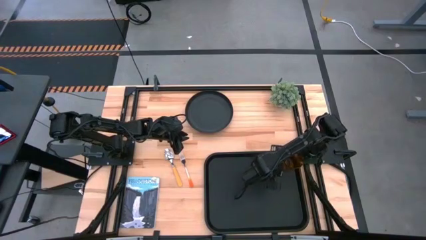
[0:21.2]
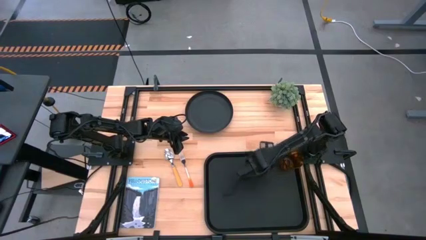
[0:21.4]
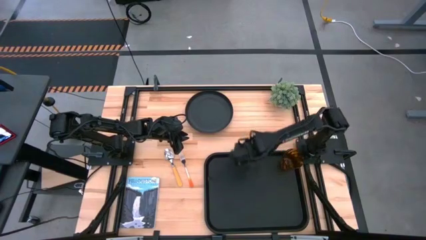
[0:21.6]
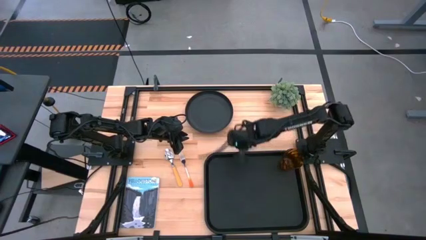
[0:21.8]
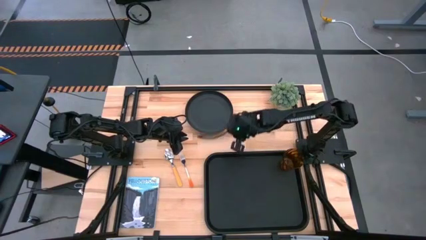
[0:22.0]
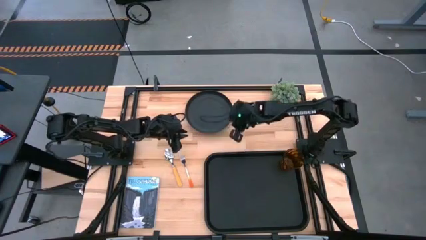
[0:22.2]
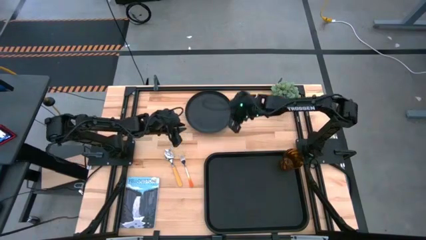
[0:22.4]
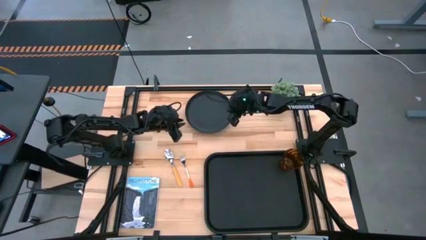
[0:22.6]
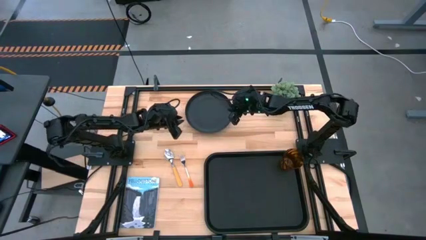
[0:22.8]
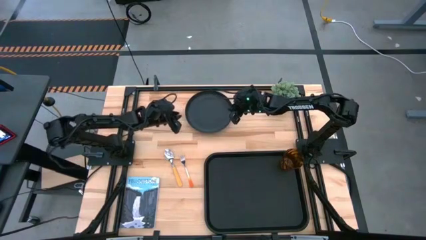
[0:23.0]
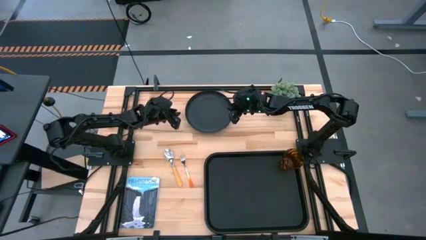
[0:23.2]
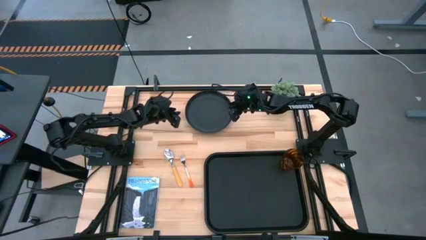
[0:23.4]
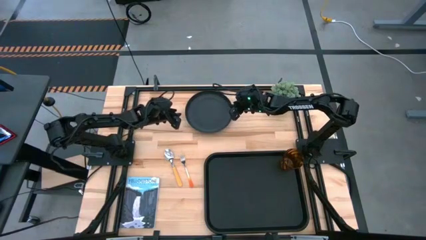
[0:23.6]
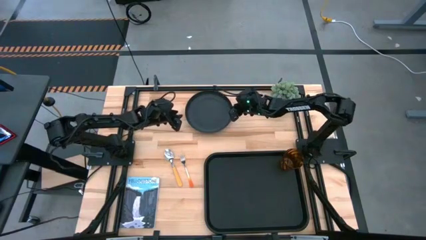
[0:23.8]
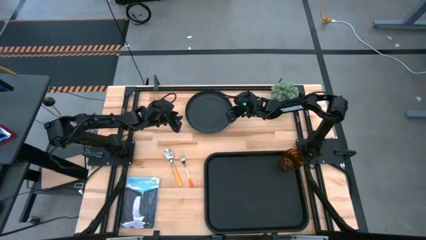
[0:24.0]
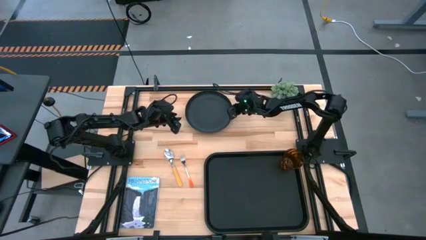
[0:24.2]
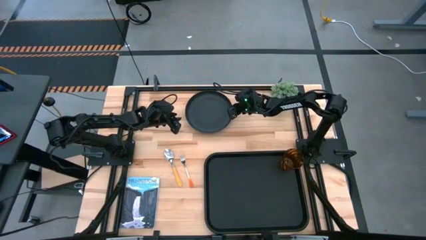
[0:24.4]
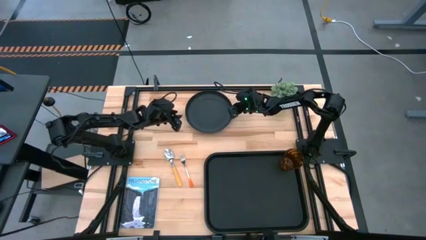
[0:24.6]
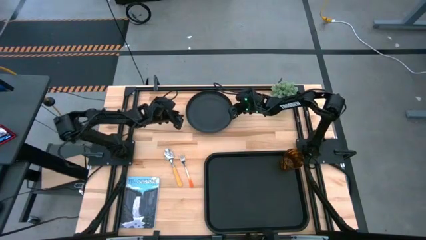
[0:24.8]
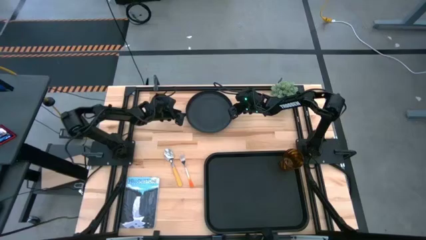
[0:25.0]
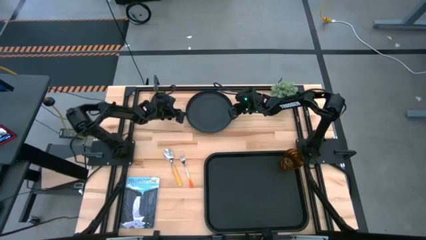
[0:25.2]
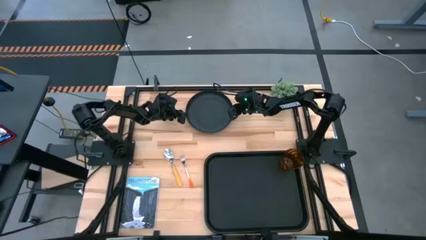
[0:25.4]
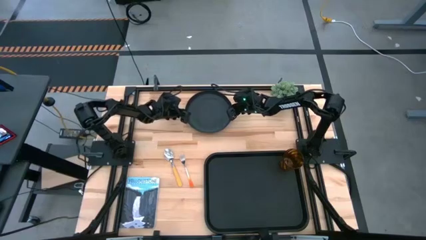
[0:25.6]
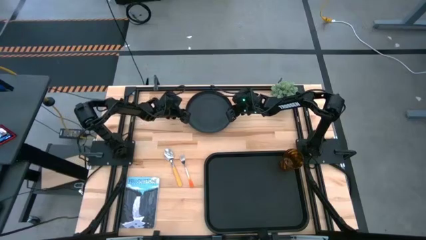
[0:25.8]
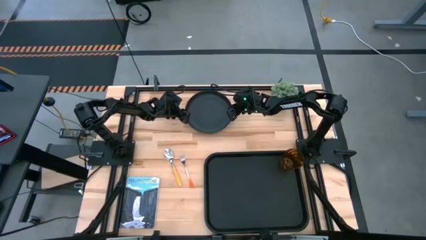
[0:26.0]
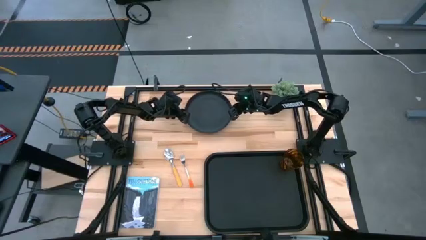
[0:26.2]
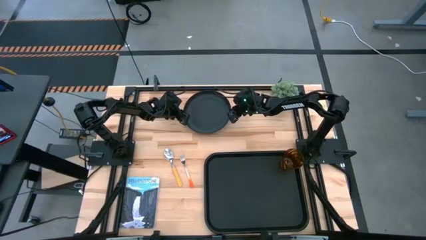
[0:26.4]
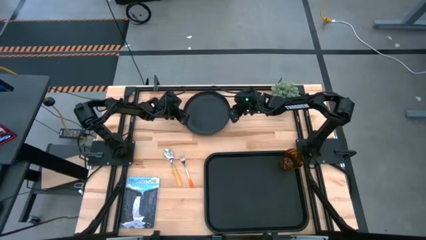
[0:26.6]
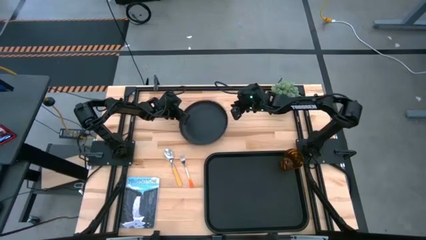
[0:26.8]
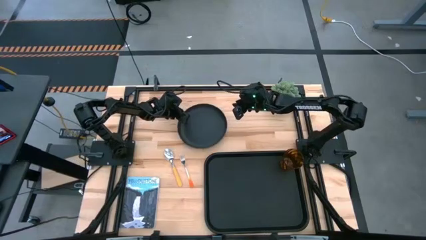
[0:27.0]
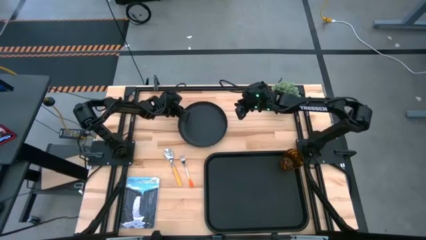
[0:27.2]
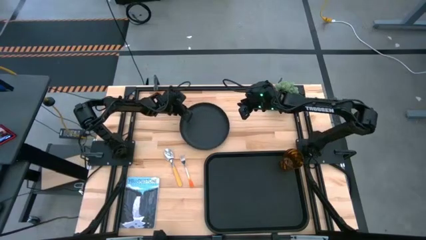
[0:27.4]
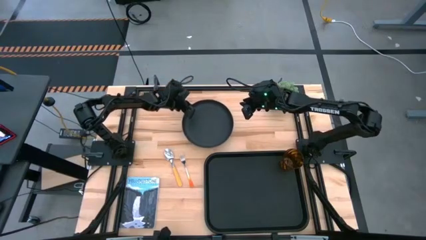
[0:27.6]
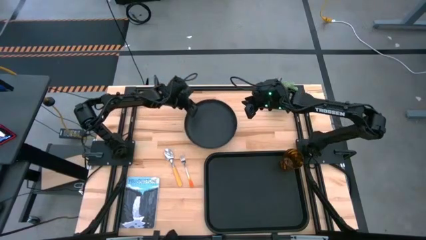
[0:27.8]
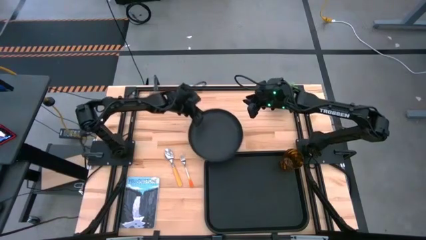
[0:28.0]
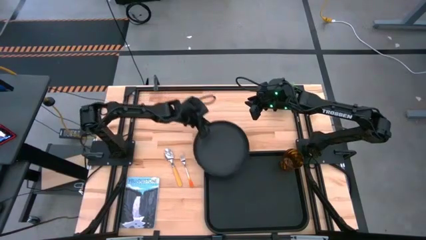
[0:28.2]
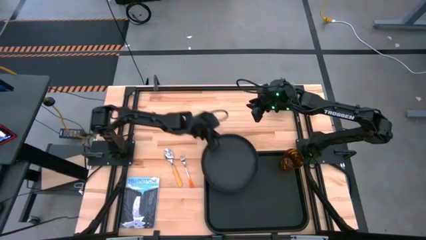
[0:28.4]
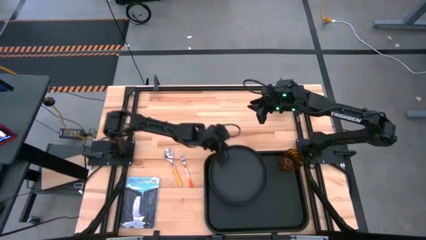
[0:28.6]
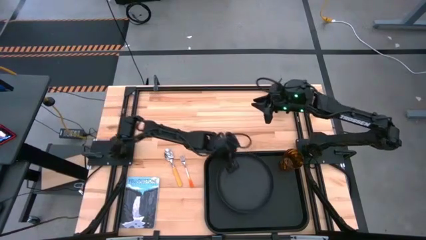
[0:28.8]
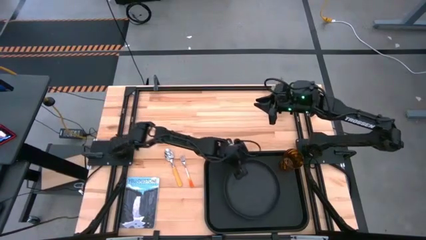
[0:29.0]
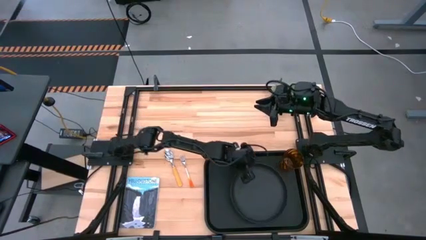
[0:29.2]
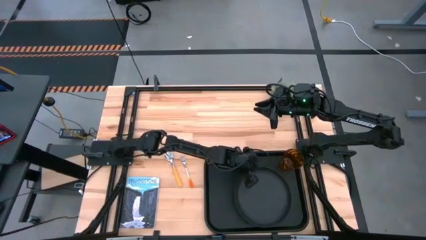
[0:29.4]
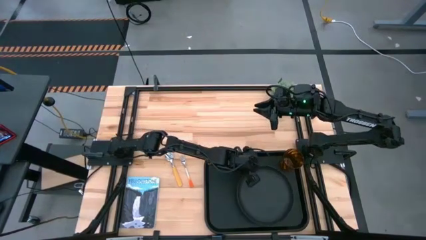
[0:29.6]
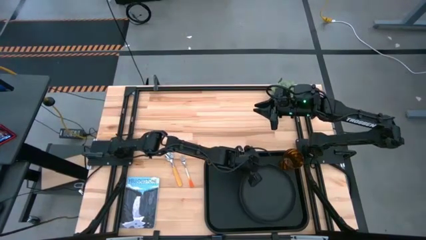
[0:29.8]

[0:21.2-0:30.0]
Task: Pick and place plate/cup/fork/spoon on tray
Put the black plate on the black tray

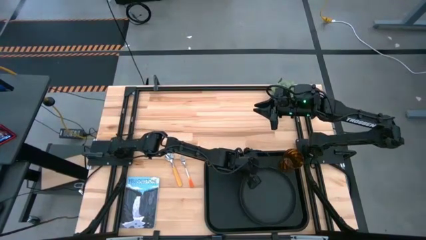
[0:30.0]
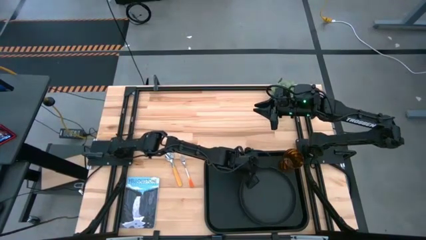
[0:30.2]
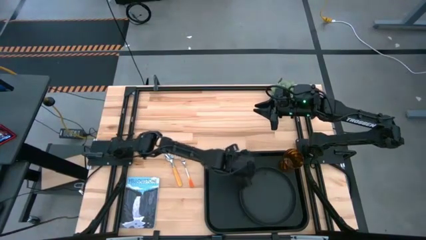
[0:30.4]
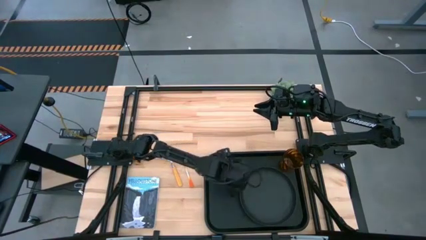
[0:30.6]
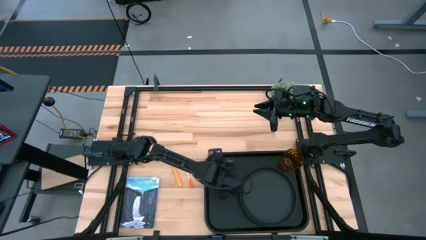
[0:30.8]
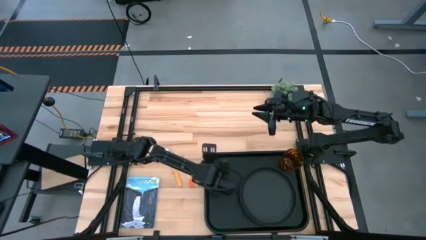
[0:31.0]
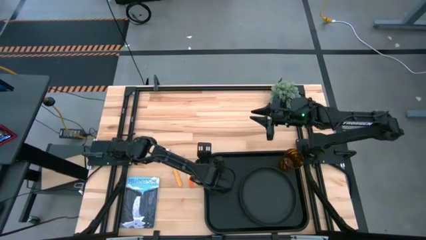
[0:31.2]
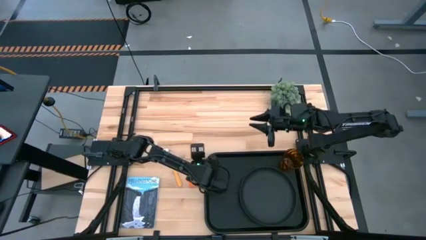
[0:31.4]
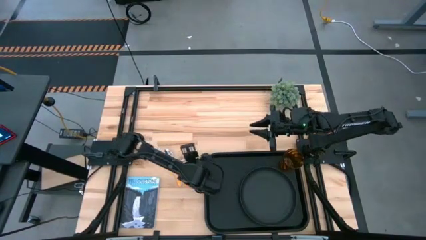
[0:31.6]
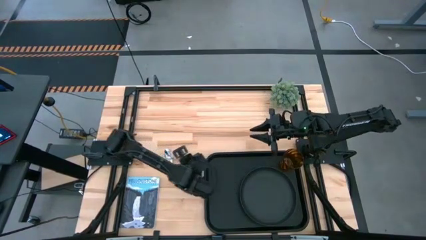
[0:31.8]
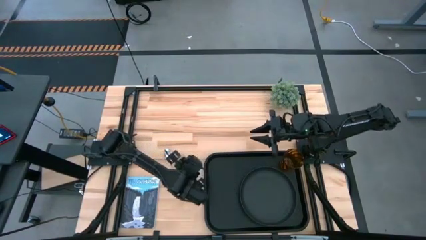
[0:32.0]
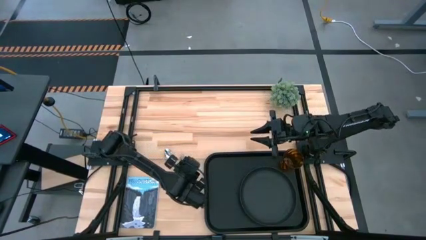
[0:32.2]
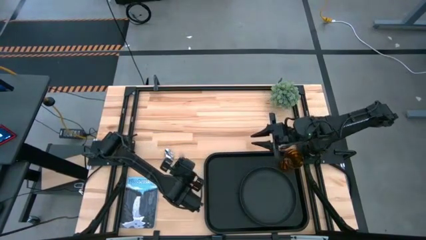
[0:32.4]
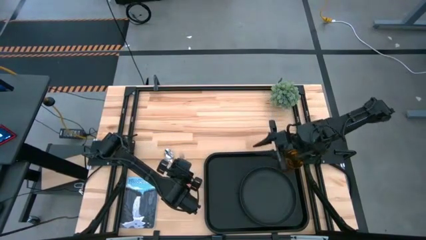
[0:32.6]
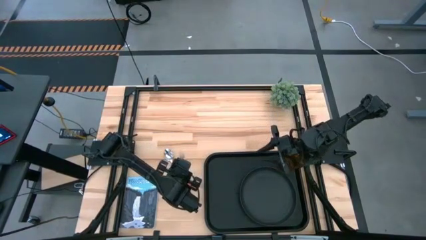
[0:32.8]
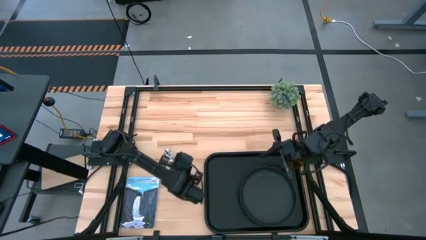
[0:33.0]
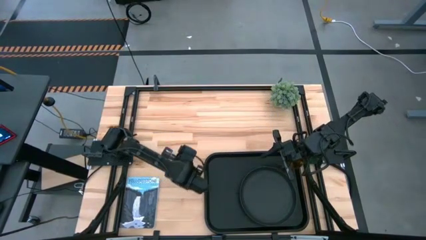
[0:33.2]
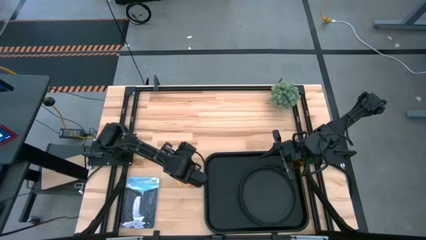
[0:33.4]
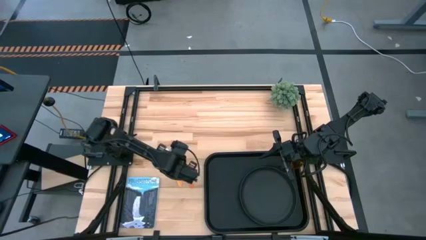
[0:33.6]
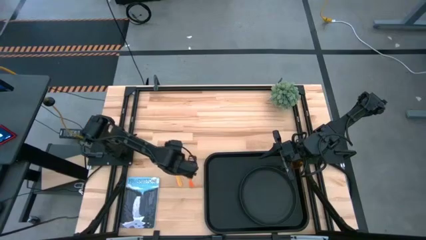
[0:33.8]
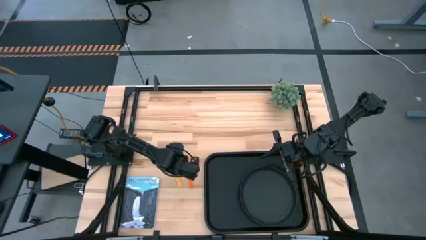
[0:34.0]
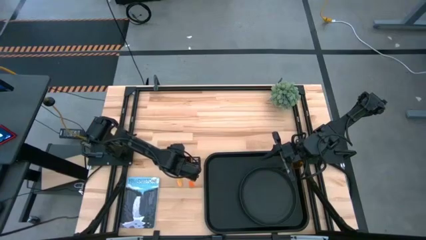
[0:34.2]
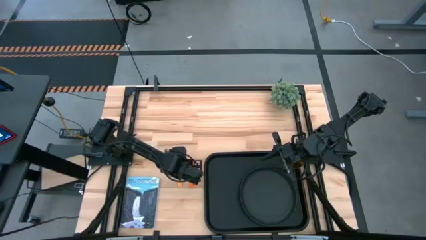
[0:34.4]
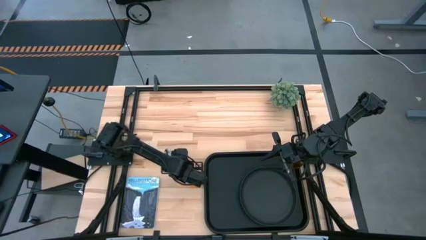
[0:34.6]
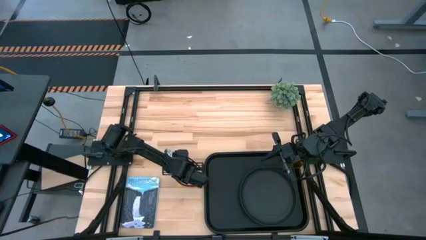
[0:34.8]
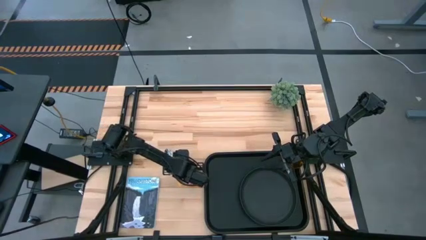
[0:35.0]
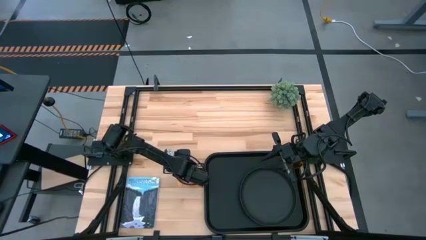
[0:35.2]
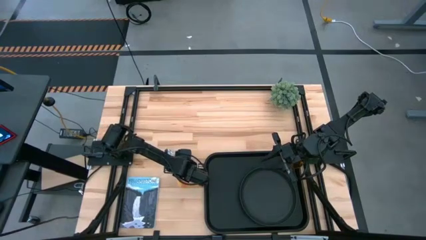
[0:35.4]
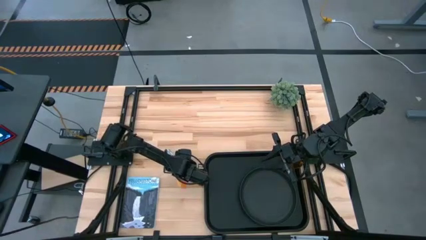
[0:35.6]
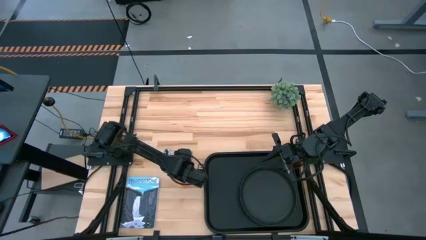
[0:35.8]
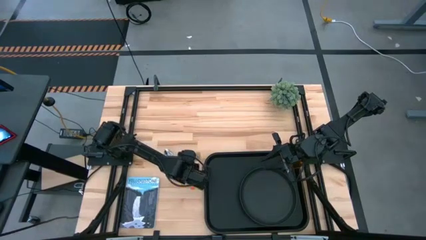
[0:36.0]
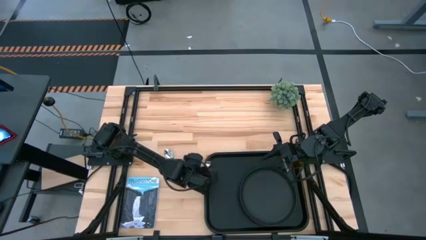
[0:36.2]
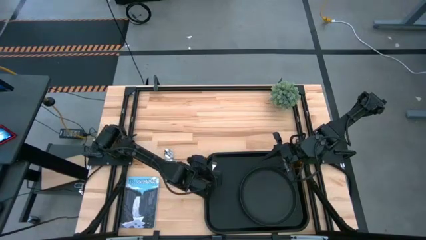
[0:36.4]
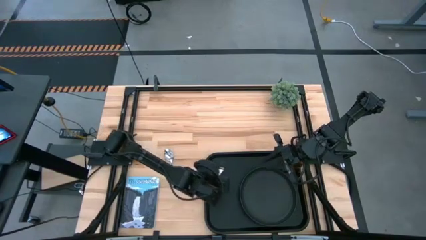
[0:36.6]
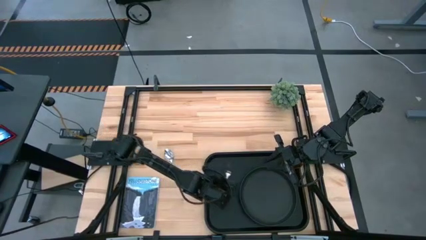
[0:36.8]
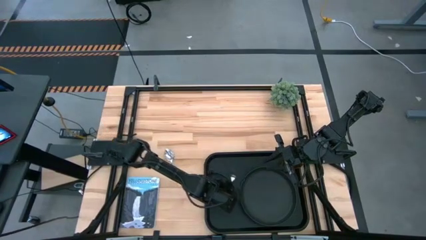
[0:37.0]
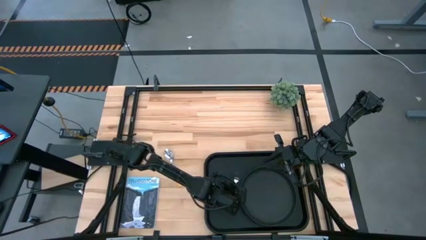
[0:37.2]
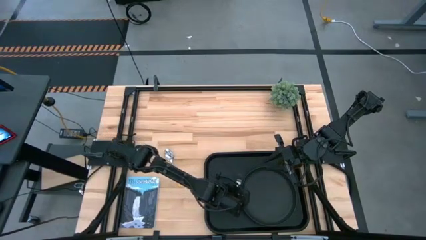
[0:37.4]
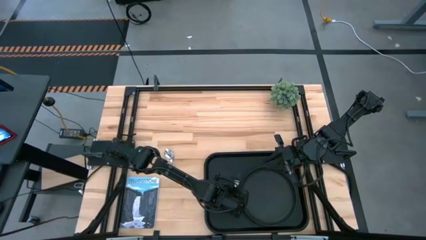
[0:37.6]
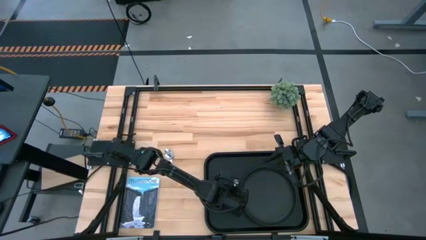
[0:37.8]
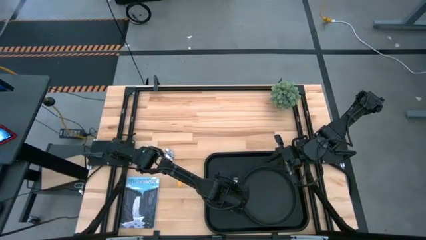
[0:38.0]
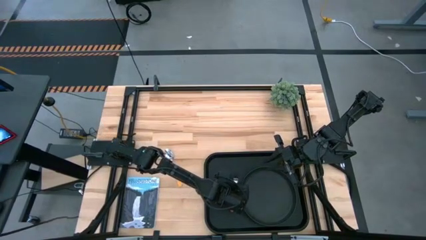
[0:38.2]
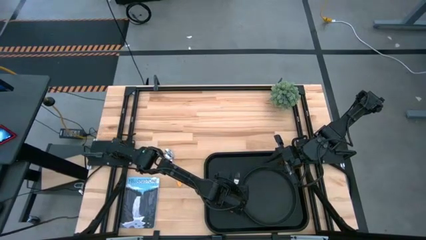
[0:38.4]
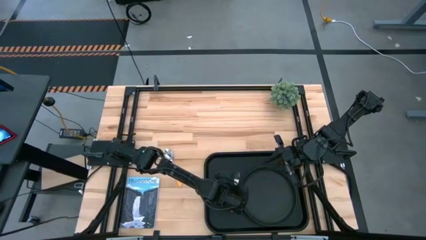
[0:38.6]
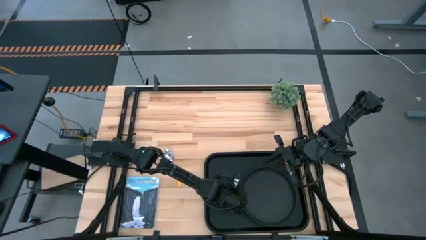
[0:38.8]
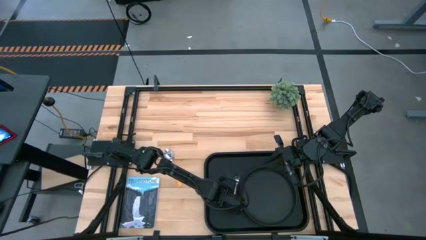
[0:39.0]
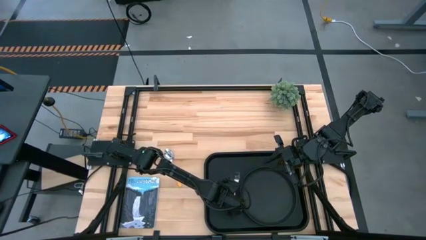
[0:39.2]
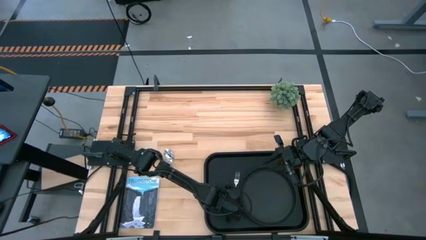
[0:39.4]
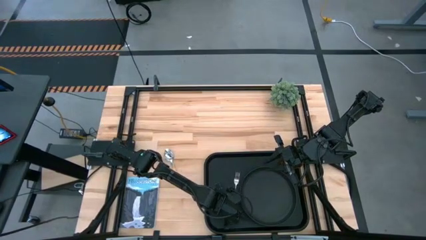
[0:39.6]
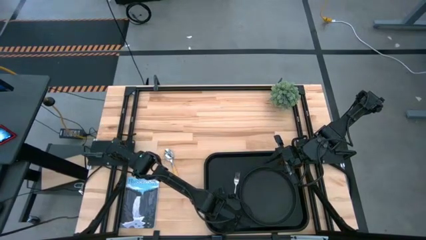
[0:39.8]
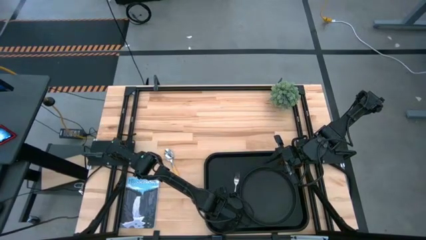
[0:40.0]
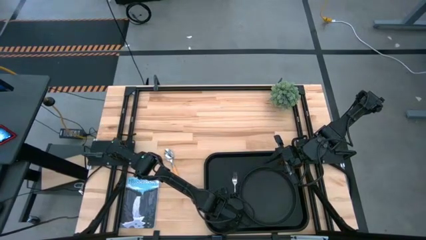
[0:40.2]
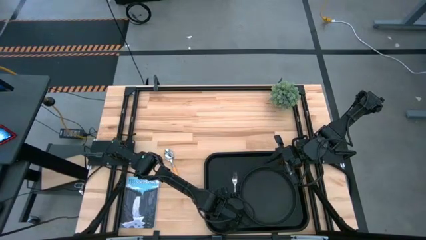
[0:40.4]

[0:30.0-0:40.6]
Put the orange fork on the black tray to the left side of the black plate
